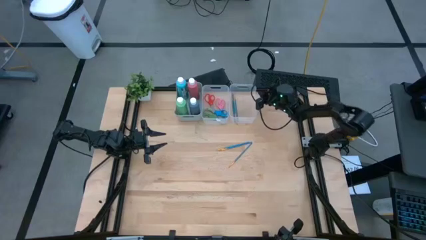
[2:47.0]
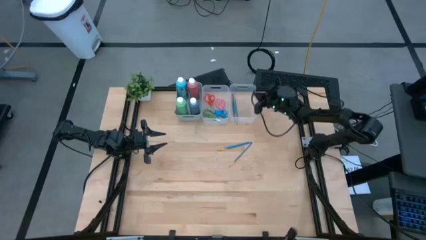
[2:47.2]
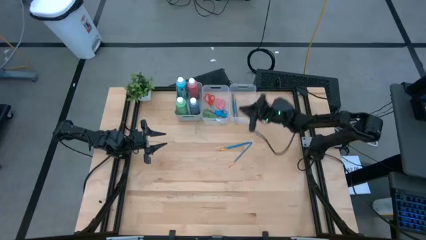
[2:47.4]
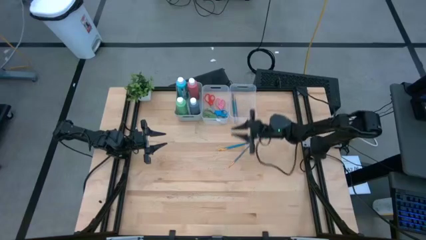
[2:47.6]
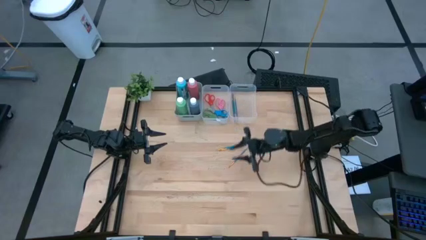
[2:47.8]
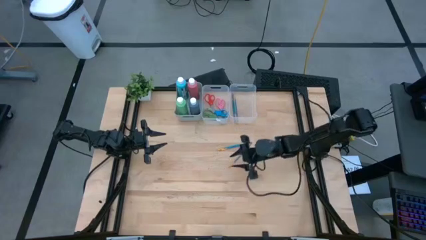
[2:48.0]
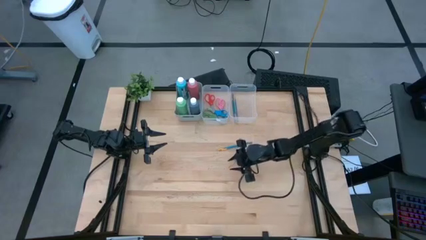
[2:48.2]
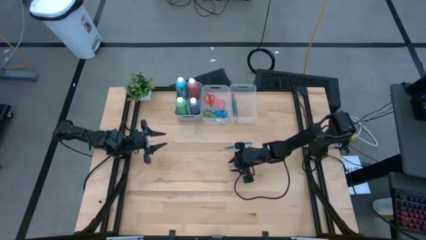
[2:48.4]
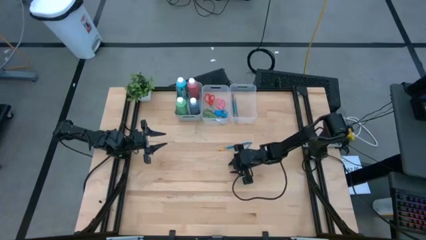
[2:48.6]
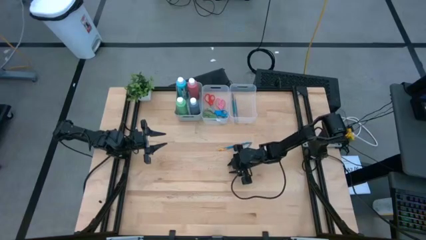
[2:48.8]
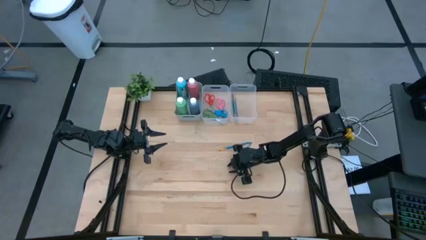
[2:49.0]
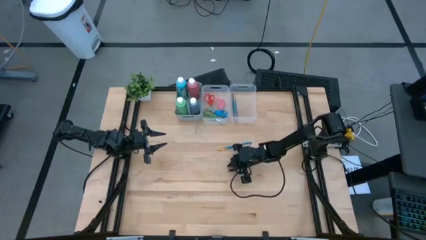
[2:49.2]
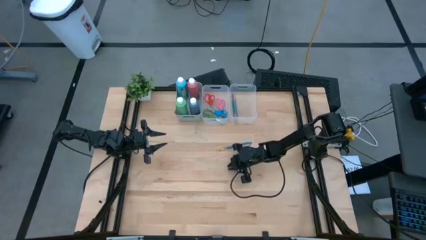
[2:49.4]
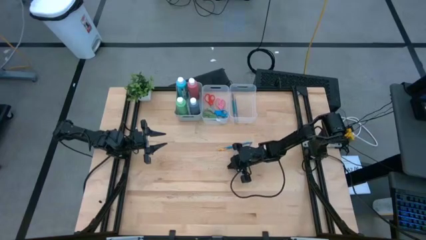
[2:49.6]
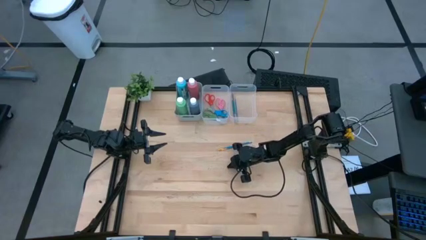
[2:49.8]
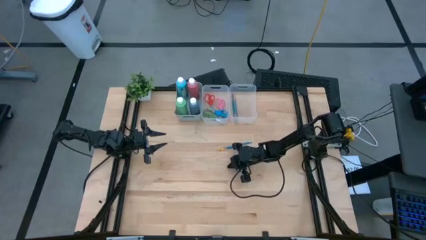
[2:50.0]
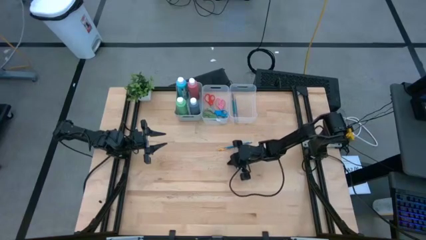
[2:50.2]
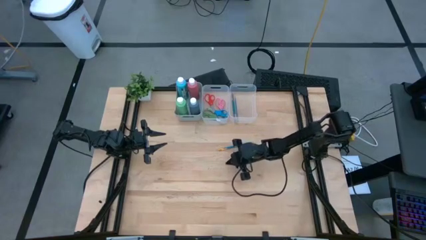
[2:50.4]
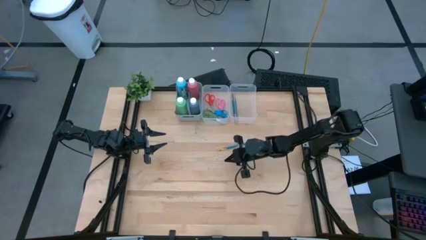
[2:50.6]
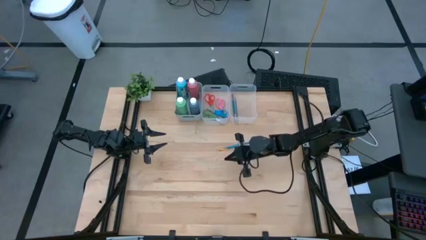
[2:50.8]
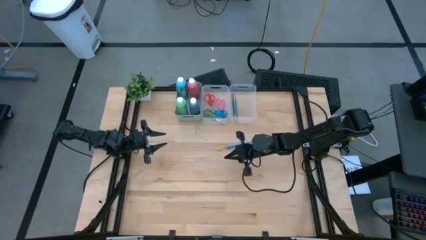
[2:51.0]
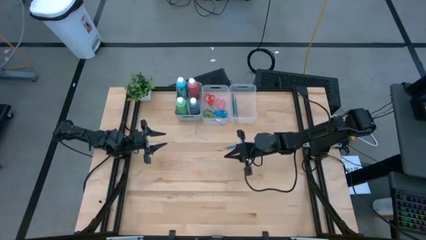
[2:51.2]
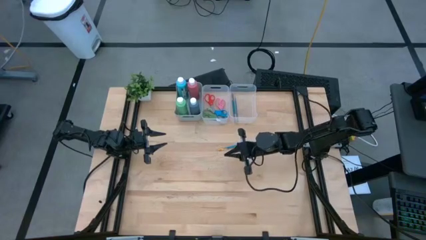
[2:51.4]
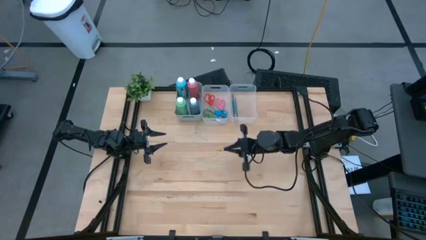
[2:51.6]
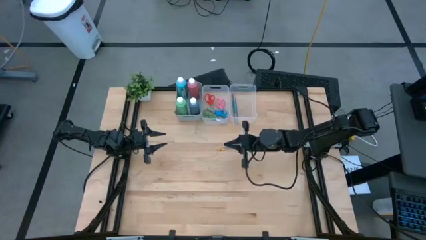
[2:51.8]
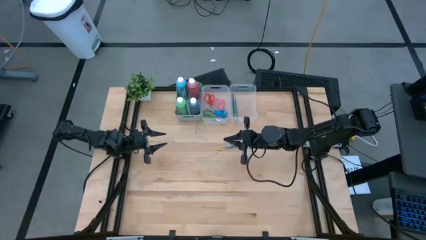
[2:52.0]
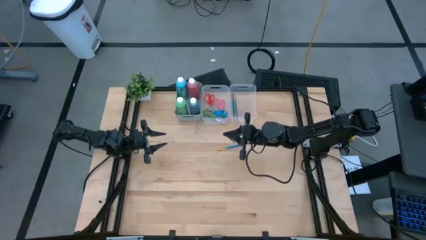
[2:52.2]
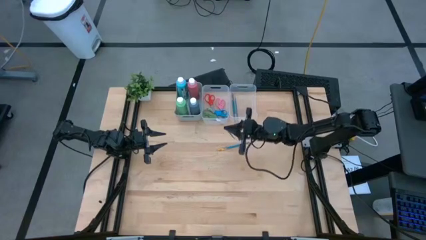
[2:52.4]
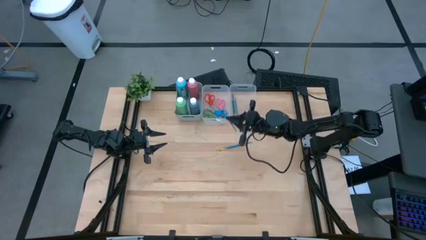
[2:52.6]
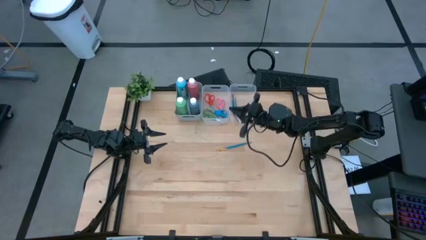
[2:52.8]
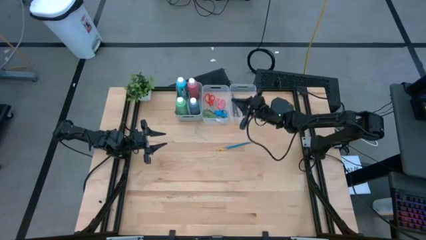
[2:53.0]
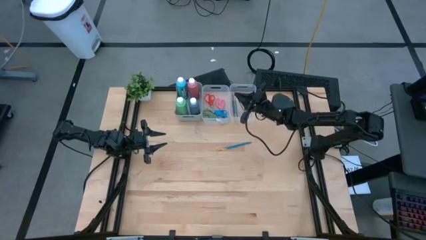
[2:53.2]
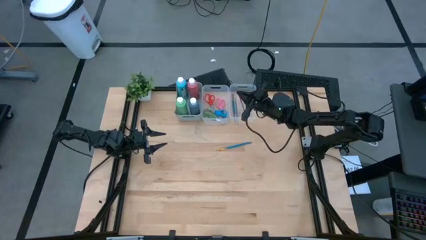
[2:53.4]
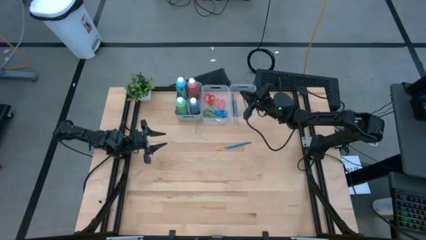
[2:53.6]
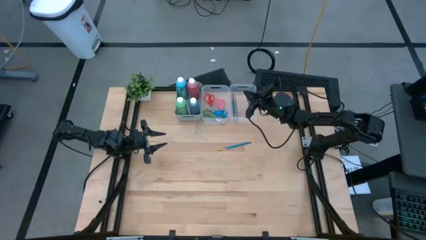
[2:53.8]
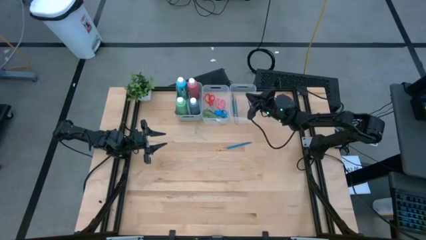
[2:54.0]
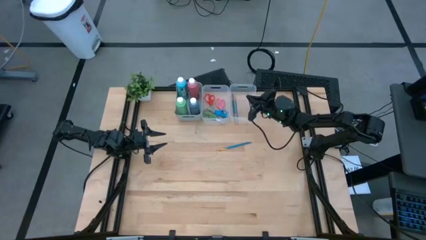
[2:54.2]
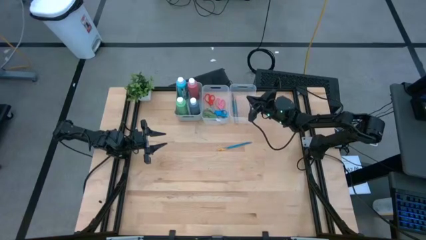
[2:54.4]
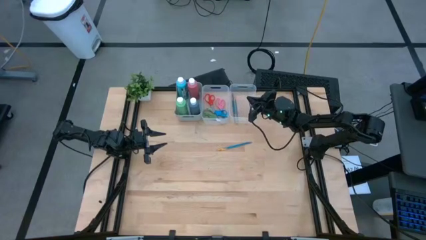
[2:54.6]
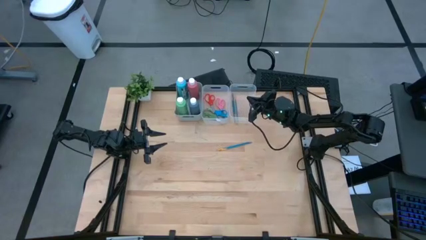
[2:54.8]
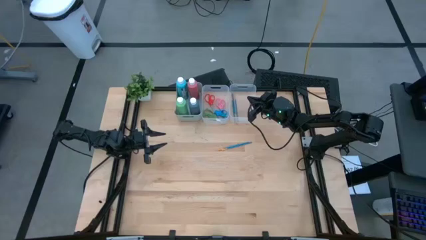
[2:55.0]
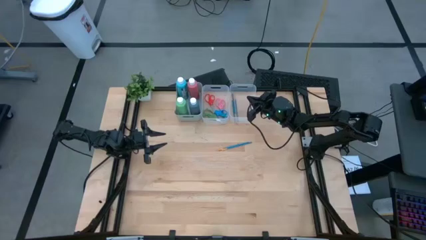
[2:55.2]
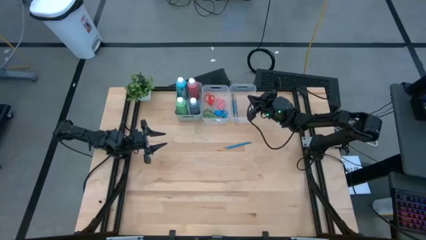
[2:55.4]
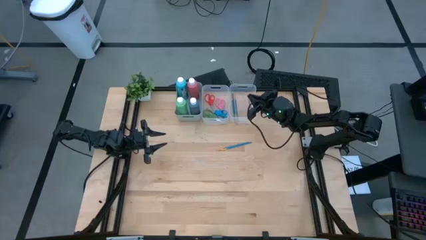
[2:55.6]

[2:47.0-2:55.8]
Task: Pick & Place Paint Supplies
Put the blue paint brush into the right transparent bin

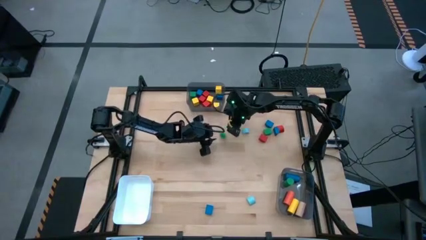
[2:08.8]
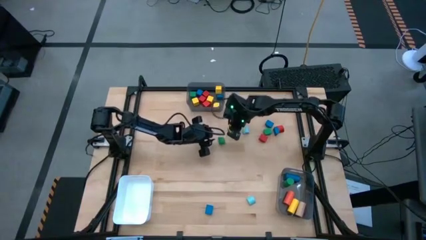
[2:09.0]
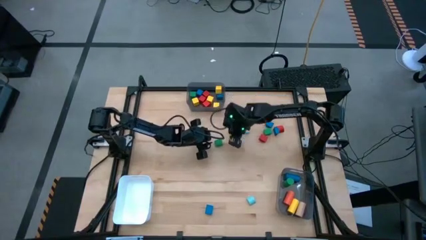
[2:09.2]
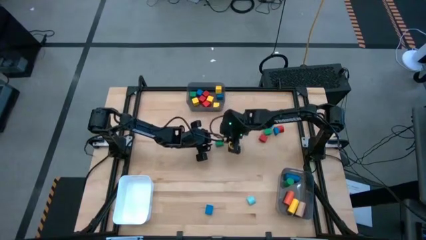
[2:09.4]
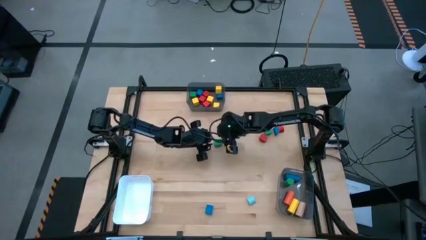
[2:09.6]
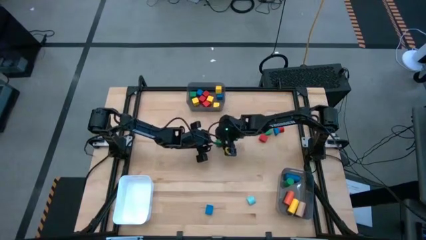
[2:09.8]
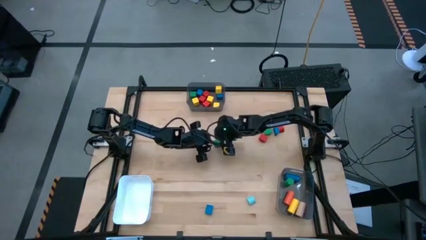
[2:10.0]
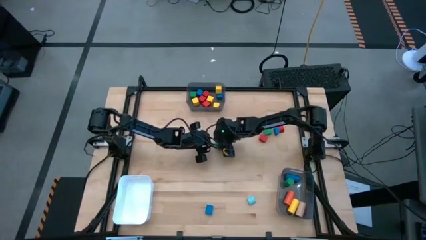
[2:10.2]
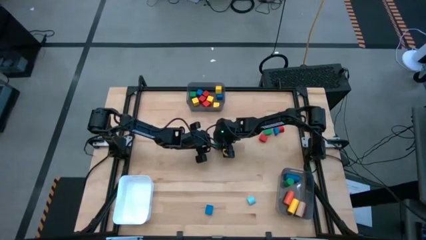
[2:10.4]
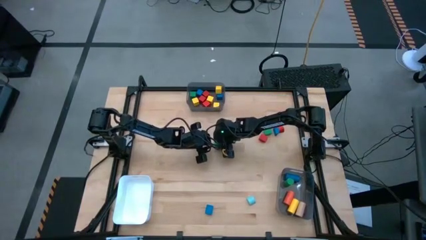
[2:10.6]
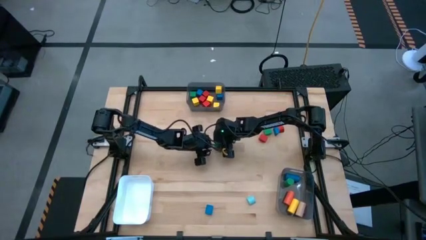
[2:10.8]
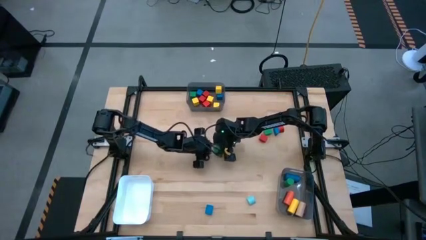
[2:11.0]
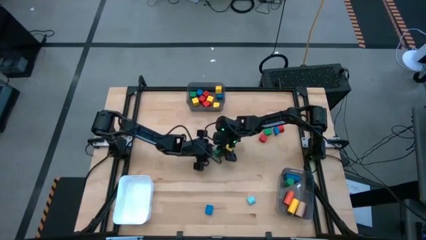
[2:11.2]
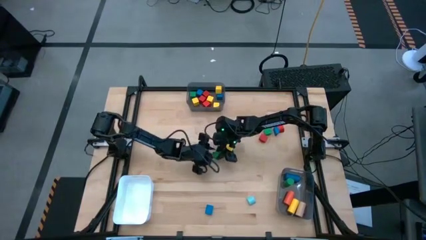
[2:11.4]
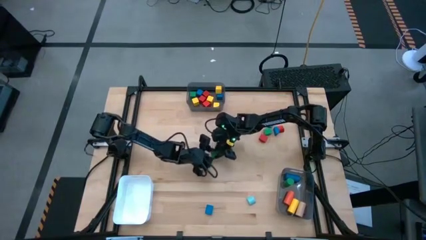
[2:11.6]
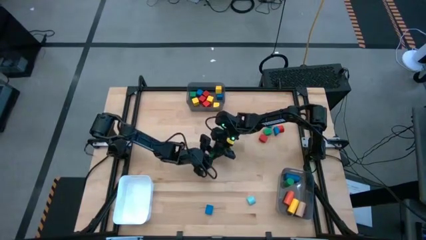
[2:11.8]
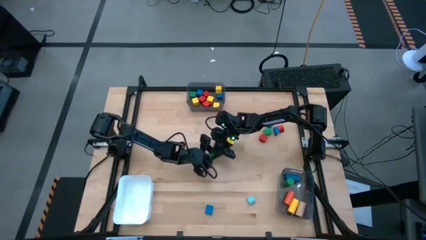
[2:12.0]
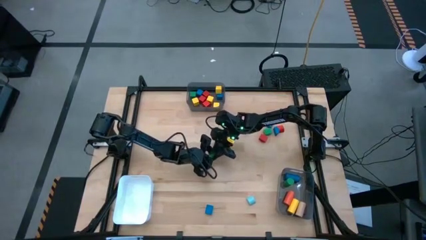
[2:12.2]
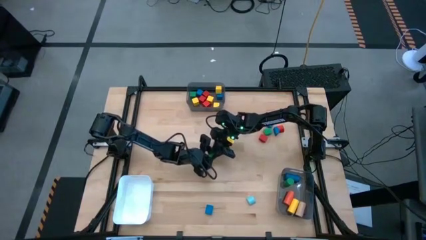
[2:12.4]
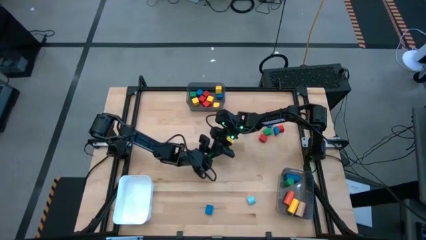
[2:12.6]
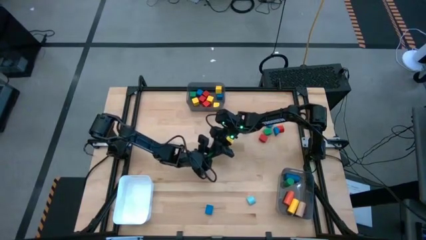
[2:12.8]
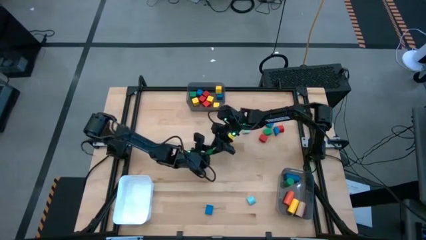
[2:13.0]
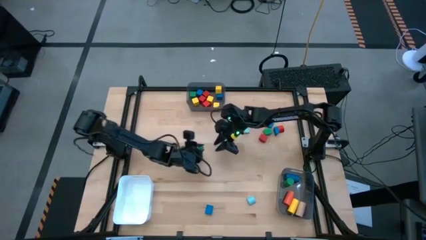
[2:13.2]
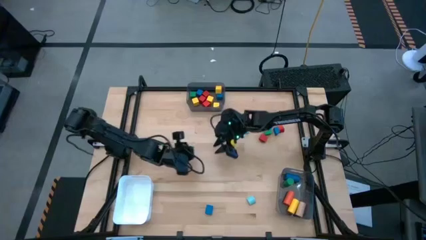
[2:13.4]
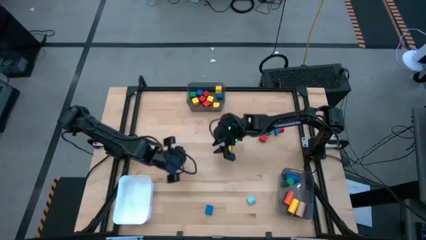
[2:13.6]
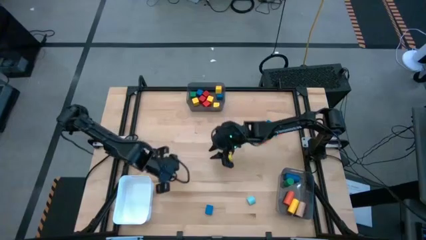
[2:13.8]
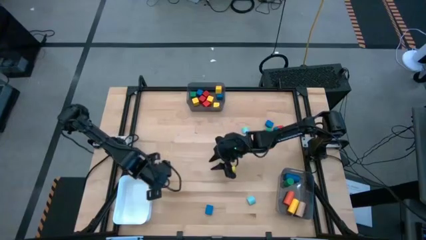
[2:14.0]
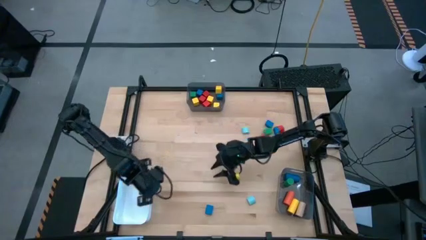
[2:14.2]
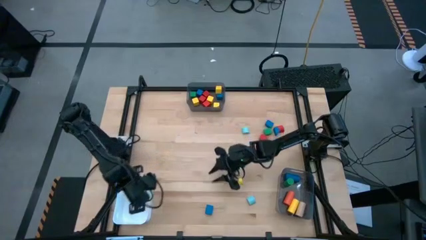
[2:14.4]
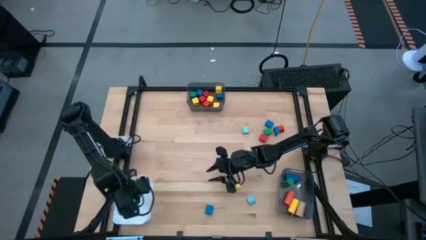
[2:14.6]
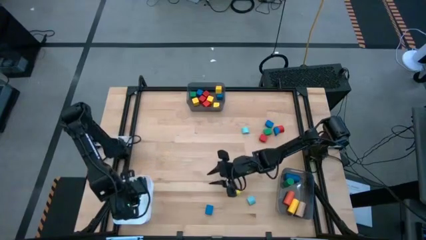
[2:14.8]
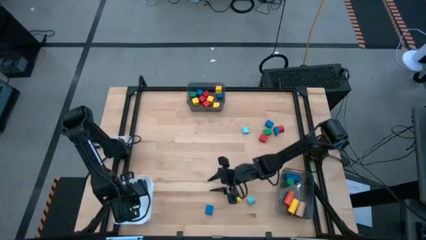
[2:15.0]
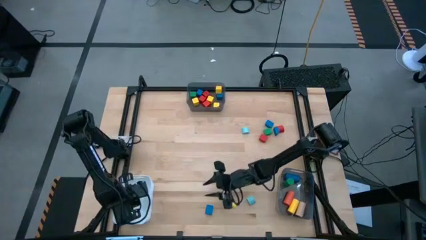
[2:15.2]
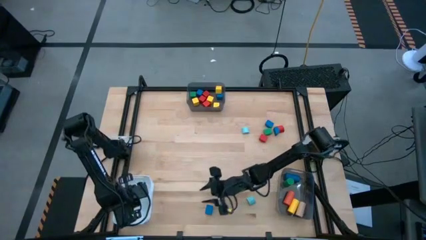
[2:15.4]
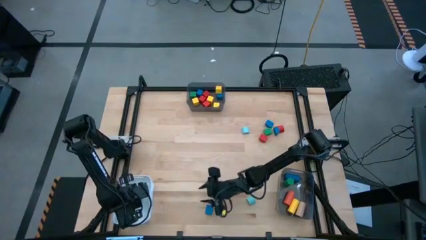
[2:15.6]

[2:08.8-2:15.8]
Task: Sort blocks by size
Put the green half circle block into the white bin
